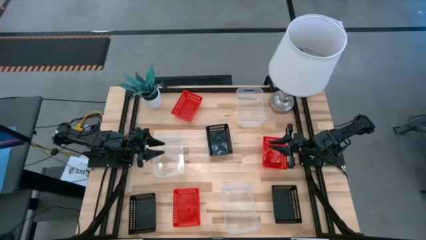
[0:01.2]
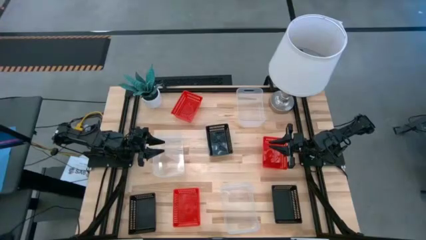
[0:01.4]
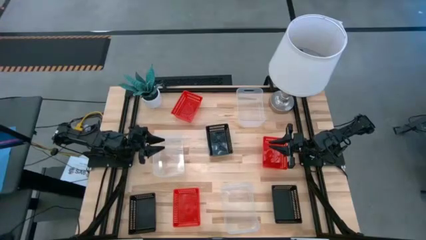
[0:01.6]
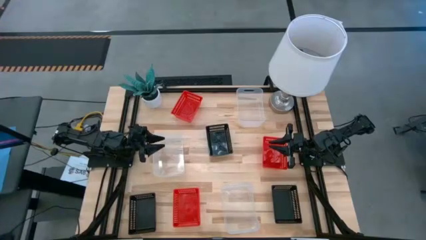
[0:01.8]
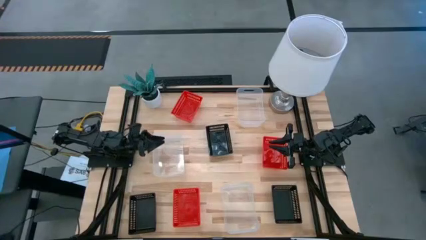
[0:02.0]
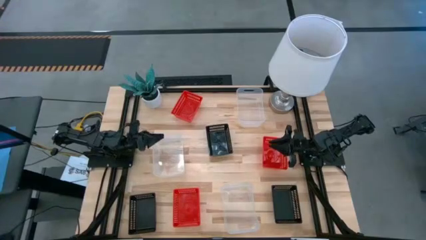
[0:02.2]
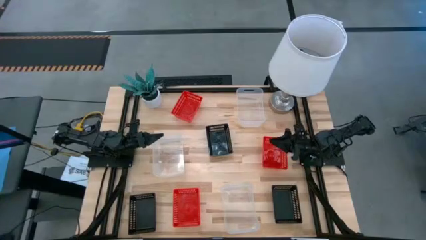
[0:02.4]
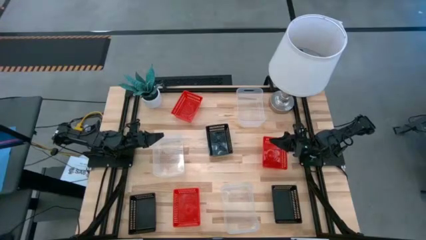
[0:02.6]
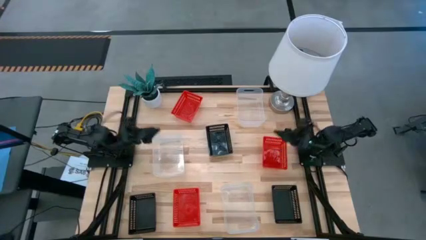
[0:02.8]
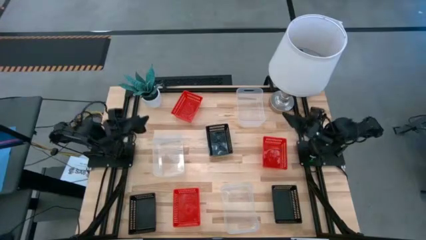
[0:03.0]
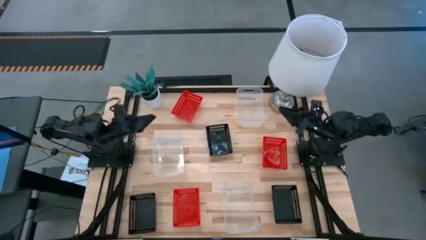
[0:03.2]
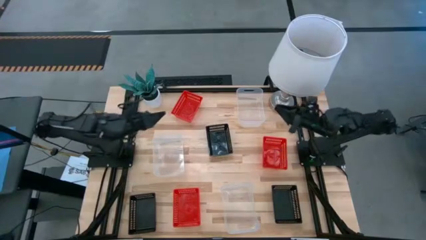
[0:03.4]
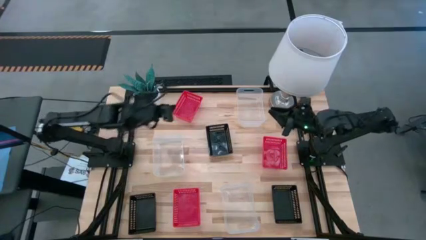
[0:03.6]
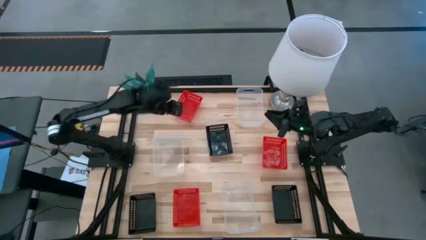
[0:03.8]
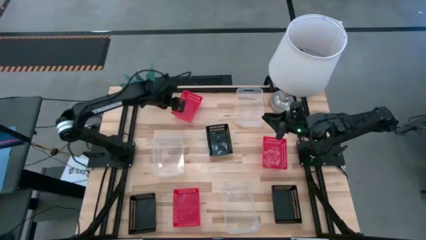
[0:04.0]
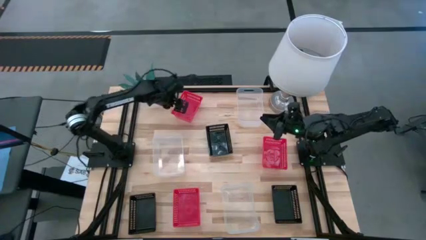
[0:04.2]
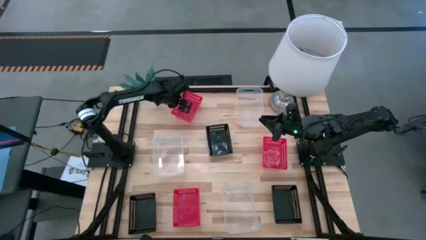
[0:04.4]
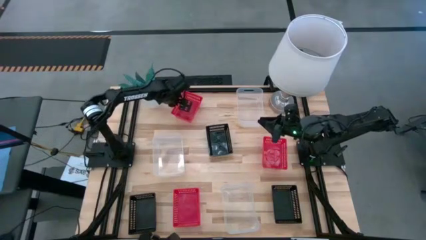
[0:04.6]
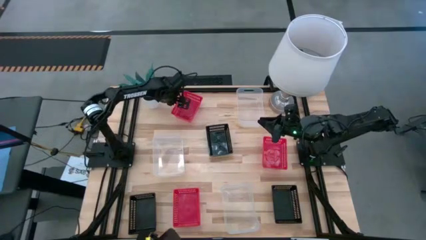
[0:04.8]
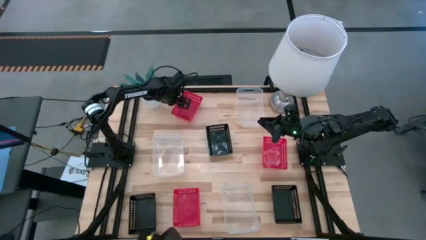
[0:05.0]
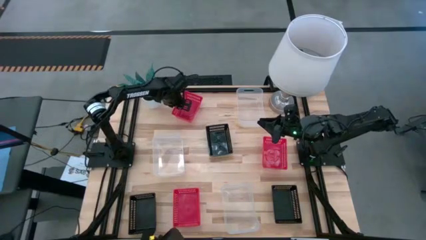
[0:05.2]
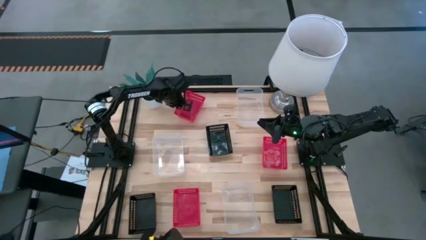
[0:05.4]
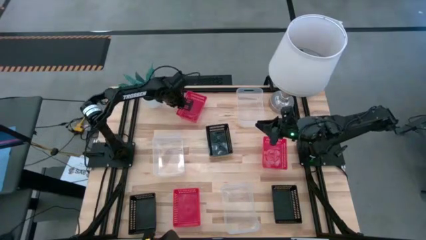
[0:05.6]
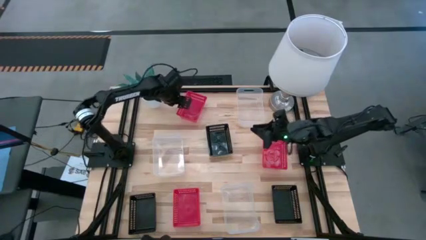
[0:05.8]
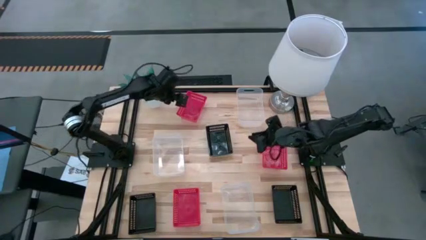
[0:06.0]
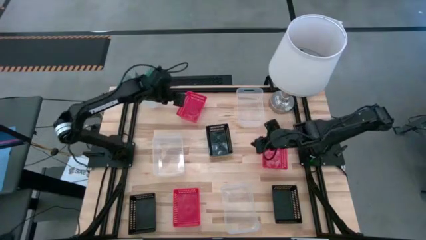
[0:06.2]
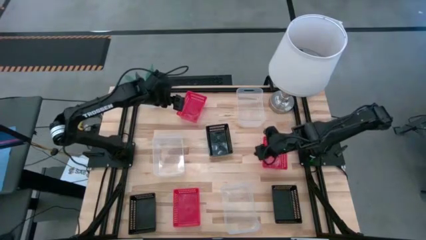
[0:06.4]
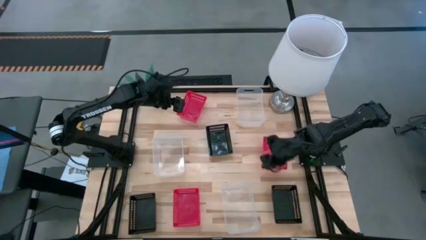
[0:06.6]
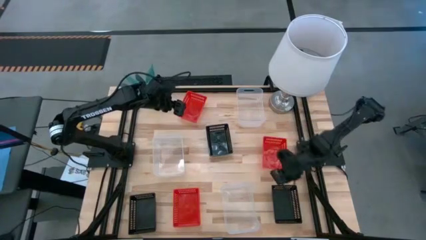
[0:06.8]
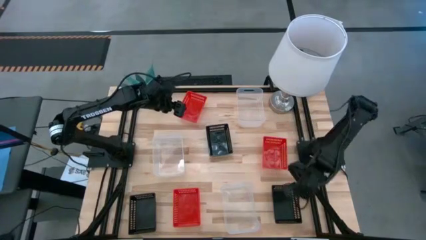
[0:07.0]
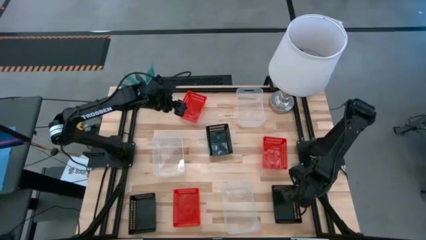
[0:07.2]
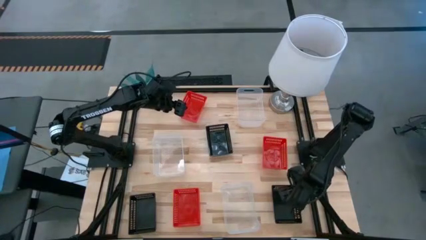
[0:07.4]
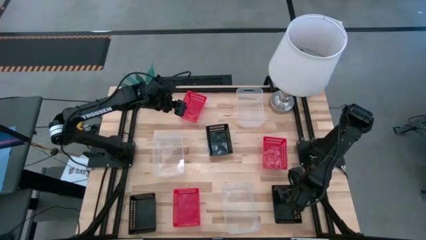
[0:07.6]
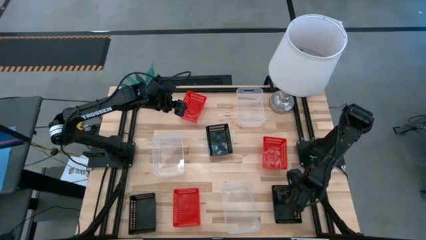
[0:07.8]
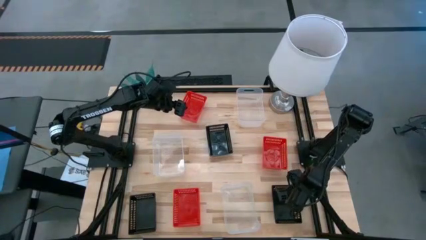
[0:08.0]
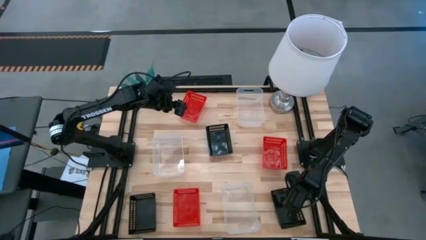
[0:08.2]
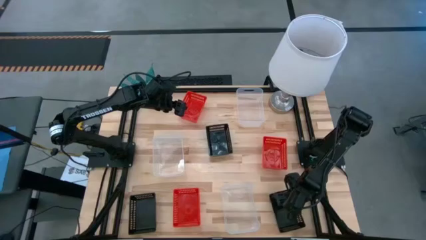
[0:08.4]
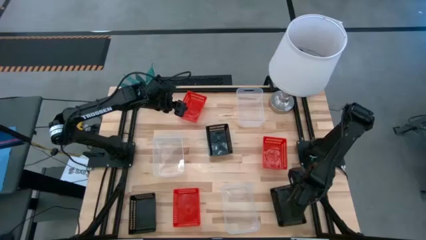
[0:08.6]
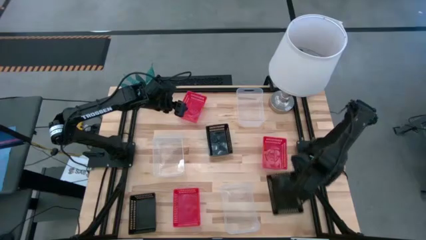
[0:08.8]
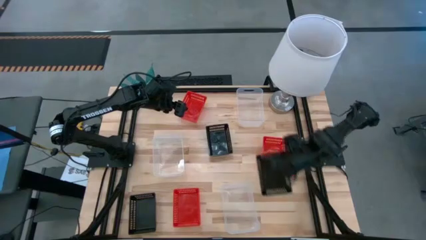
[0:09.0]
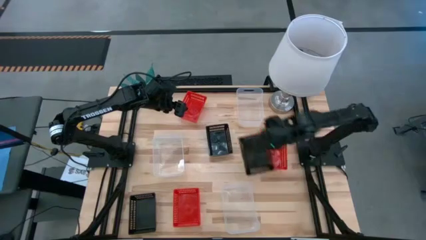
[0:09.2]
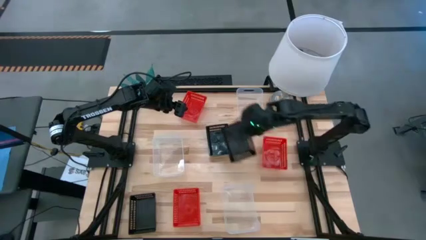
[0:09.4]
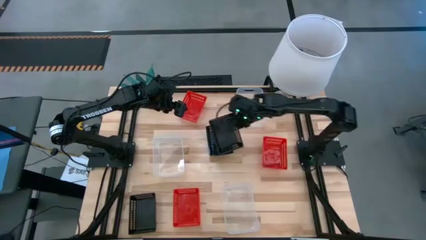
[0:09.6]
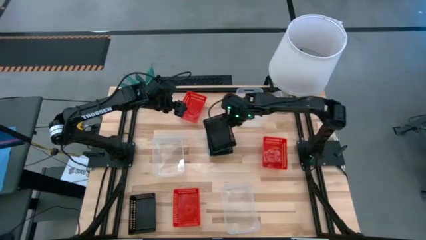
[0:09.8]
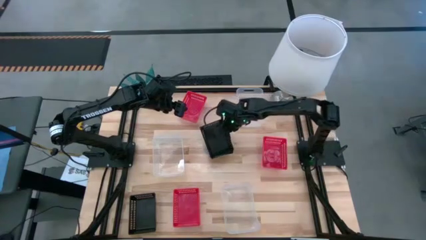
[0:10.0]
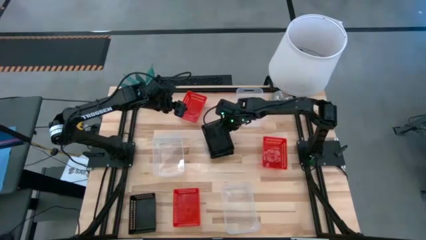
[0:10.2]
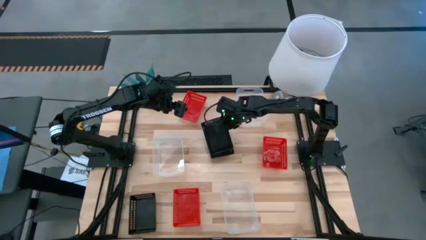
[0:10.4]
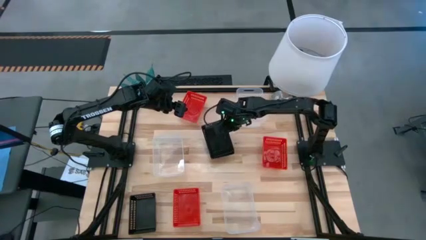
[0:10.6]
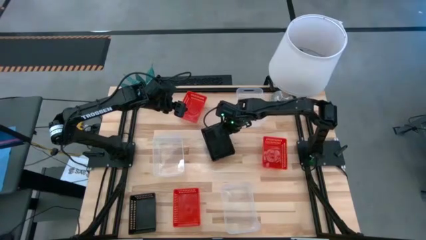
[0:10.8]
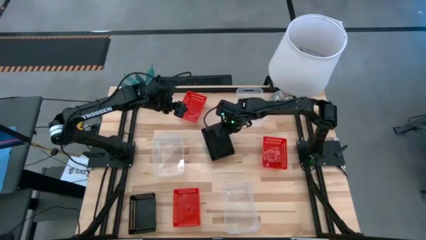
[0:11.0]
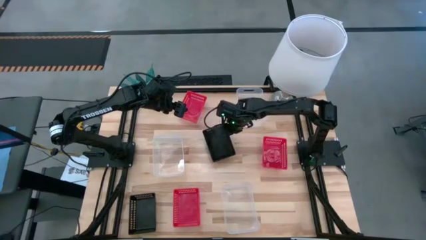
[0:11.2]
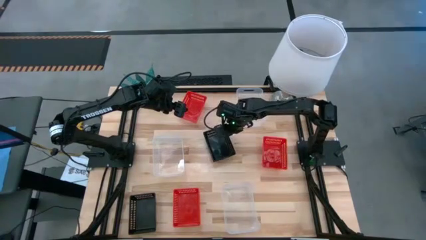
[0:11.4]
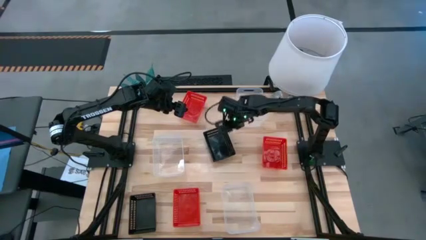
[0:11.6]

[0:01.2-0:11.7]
Stack the bottom right black bin on the top black bin

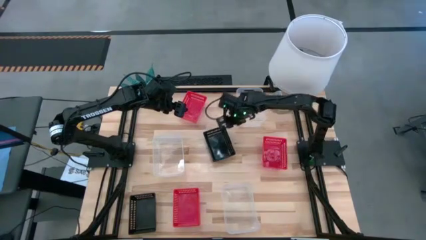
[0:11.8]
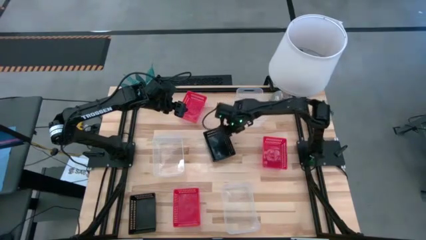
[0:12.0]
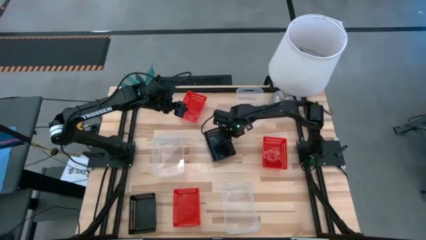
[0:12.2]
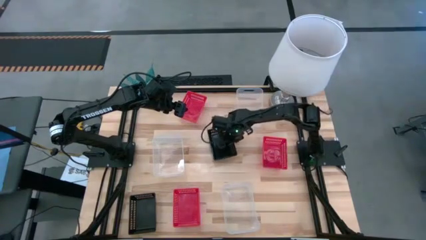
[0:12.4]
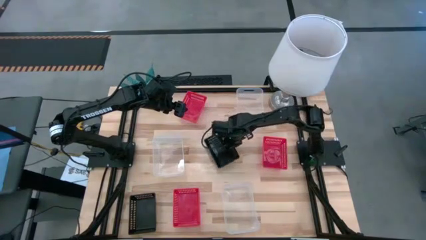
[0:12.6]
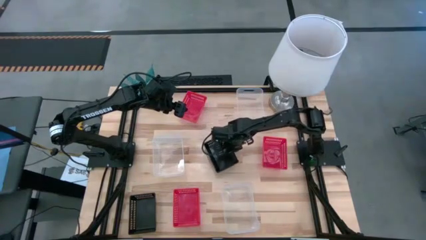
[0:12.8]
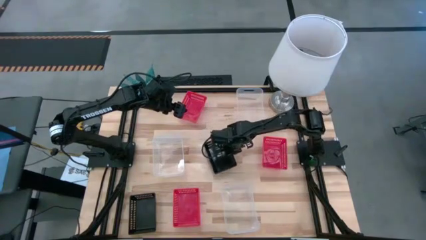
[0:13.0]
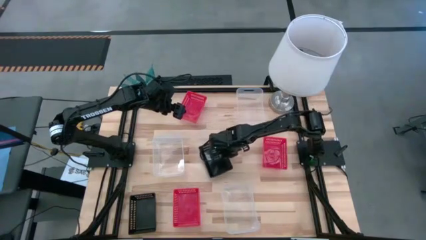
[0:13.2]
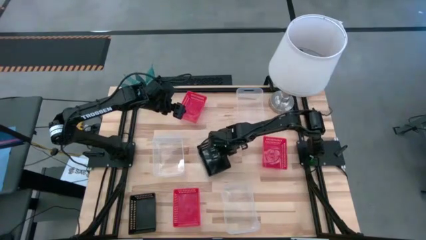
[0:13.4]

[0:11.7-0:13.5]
Adjust the stacked black bins
